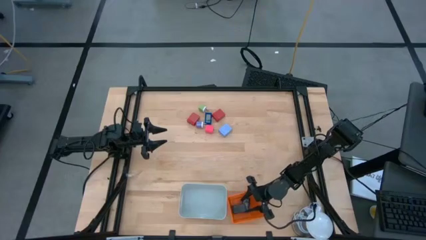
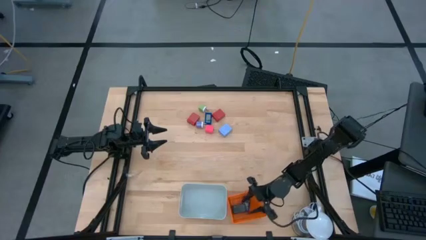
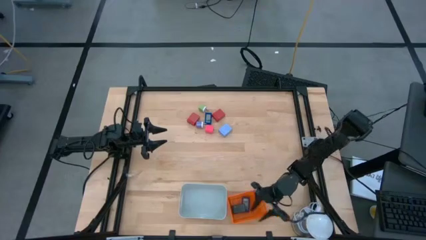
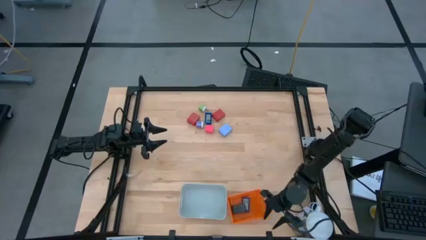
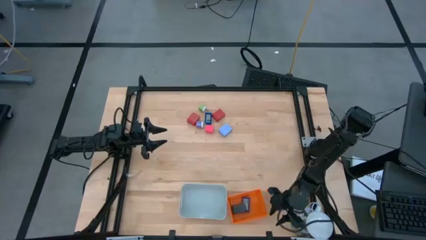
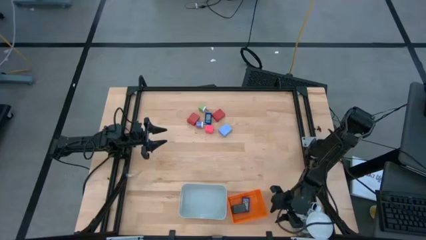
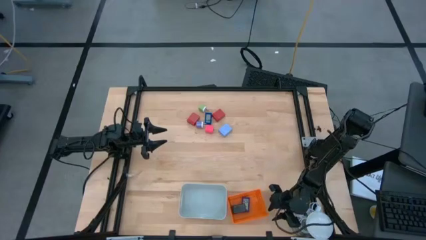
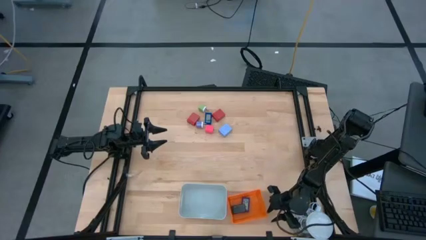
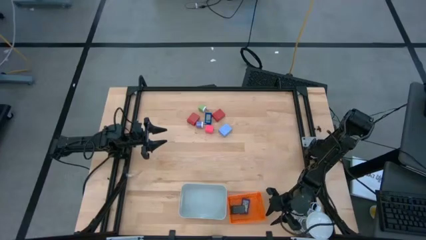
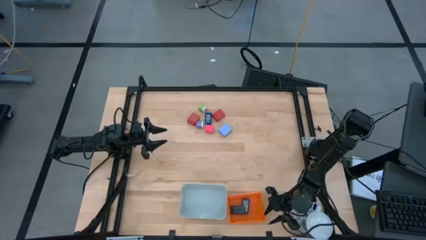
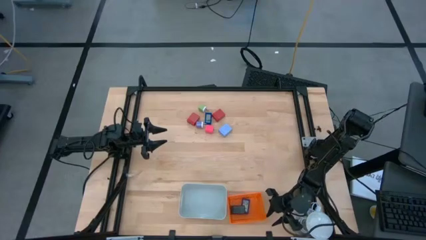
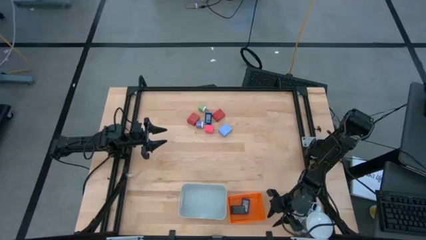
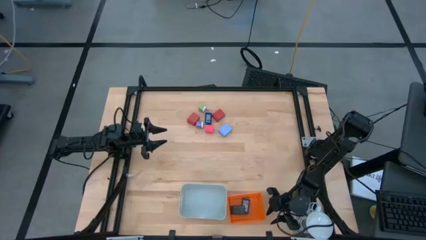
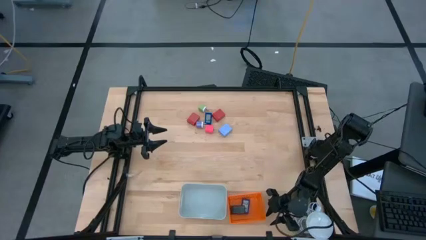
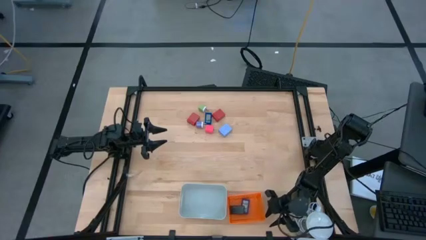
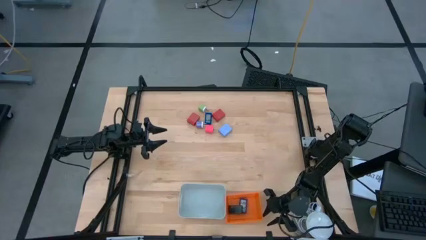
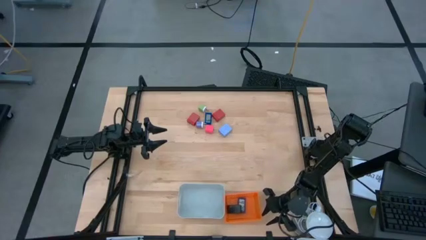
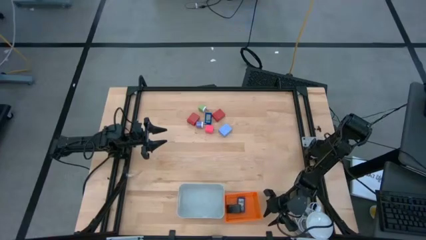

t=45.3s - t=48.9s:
Task: Pick & Place Office items
Adjust the orange bin

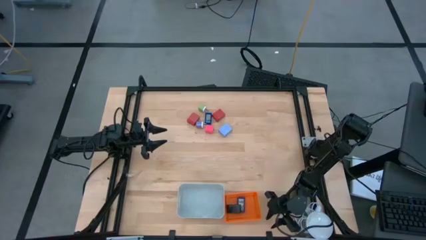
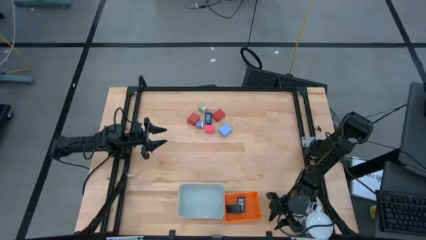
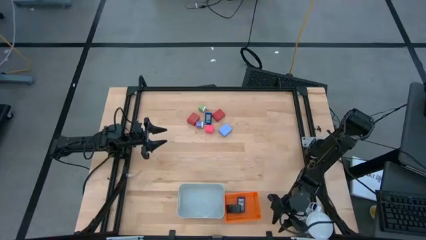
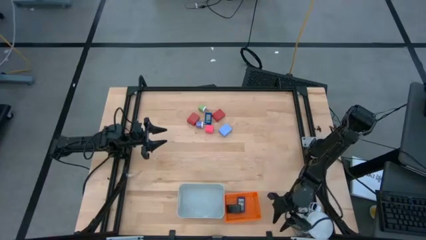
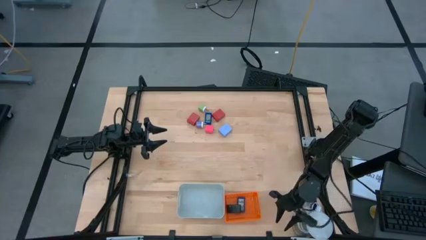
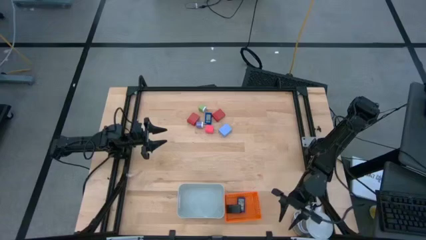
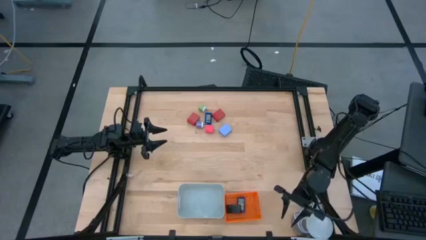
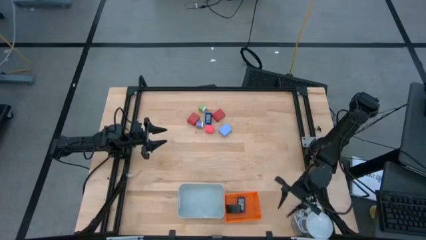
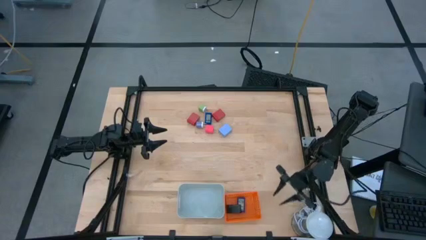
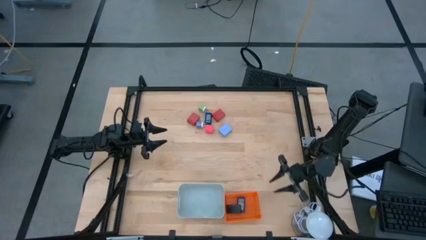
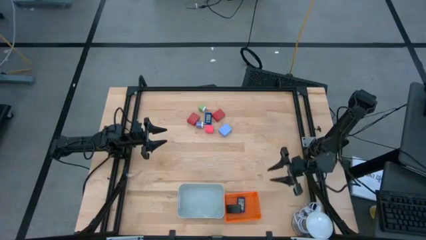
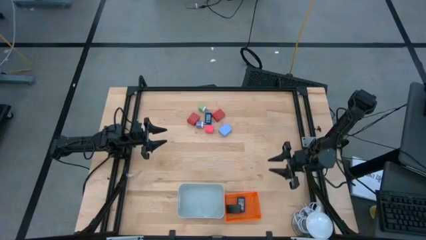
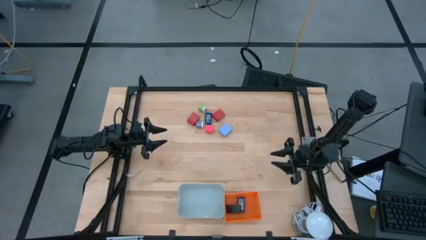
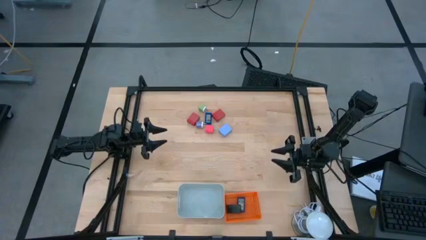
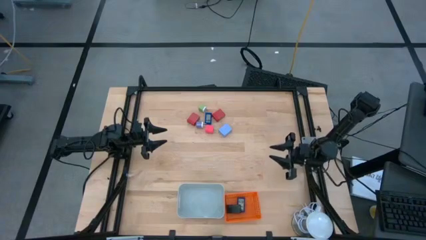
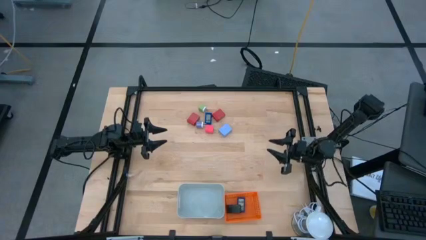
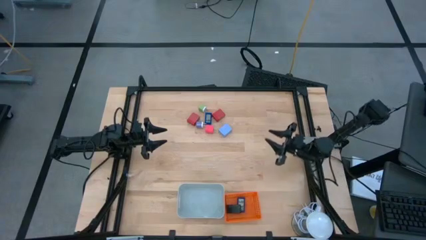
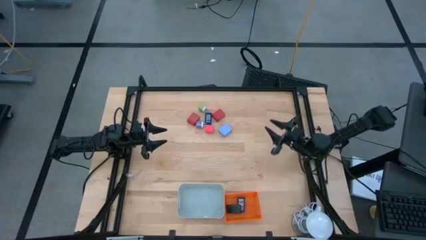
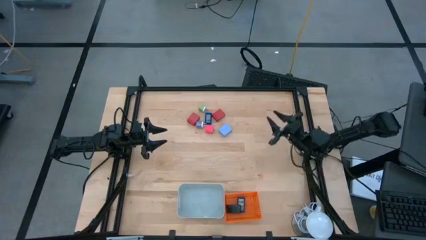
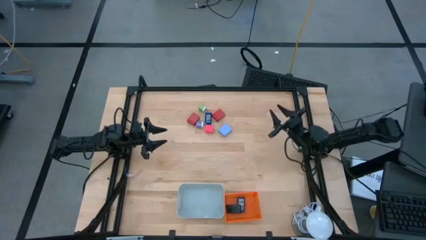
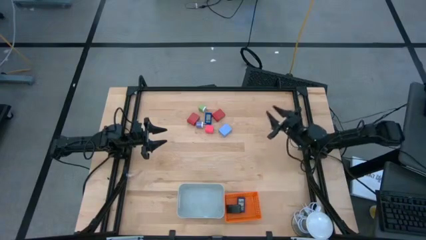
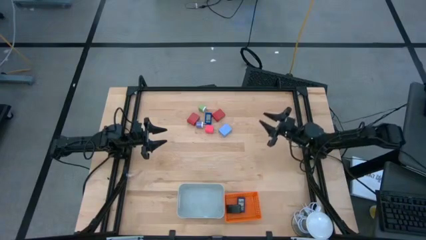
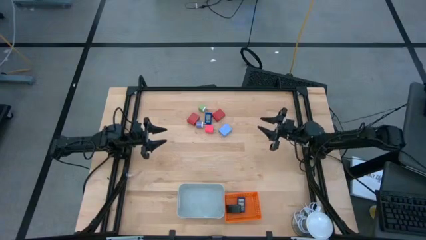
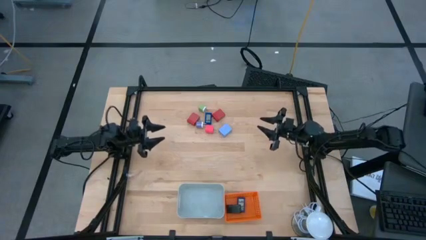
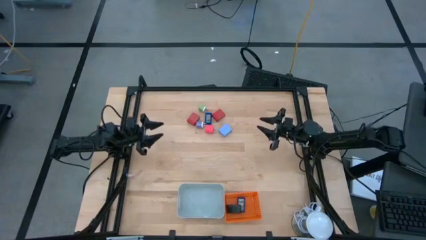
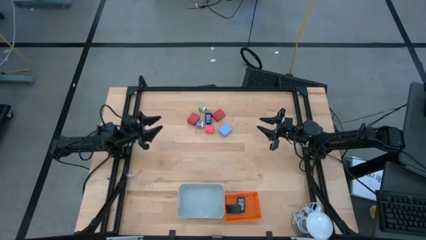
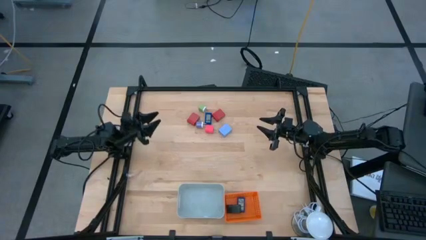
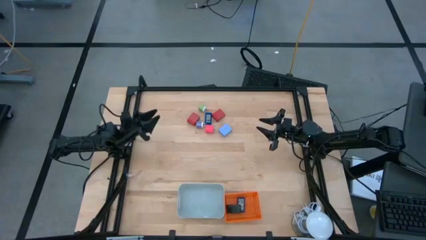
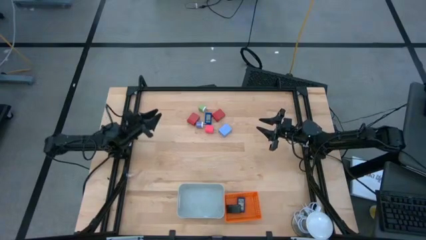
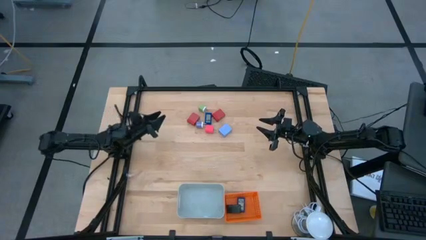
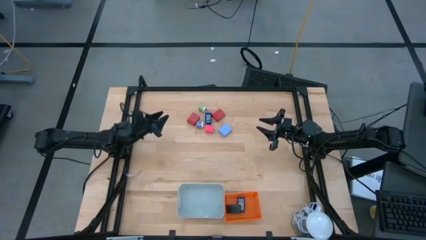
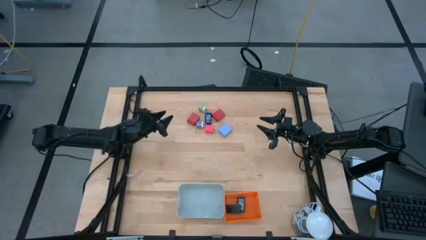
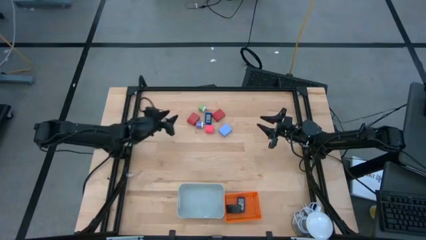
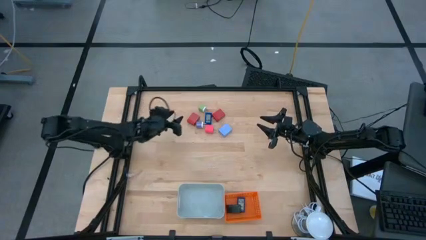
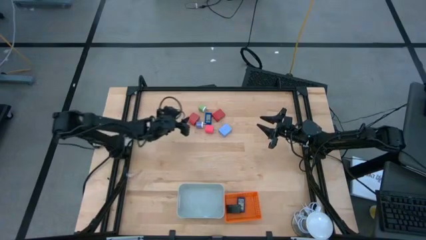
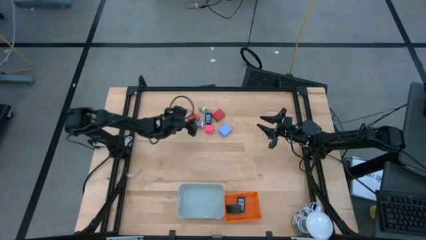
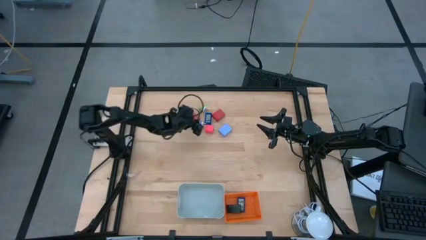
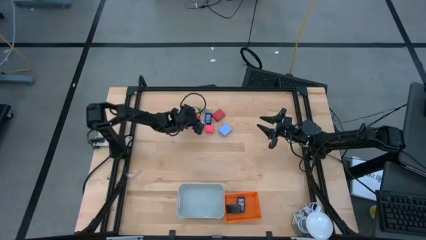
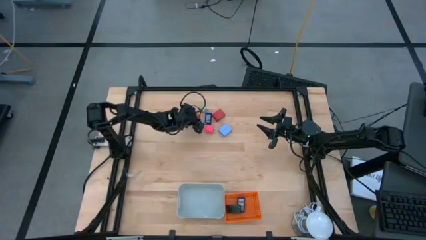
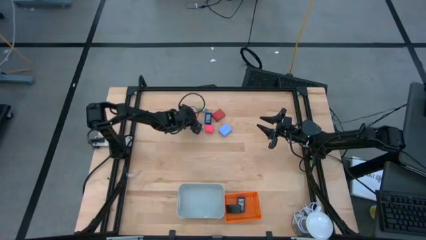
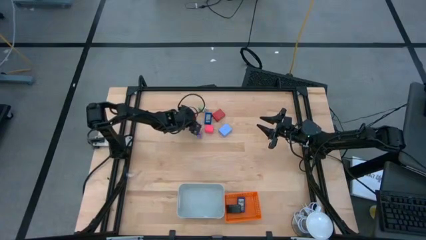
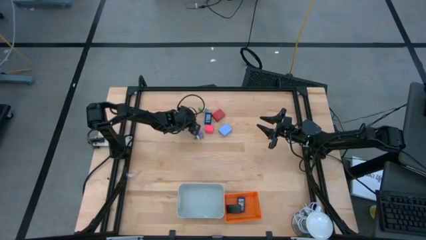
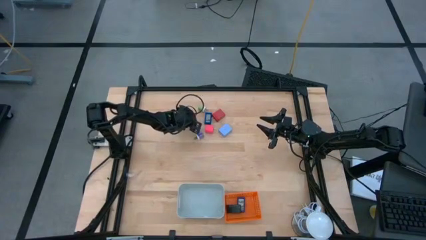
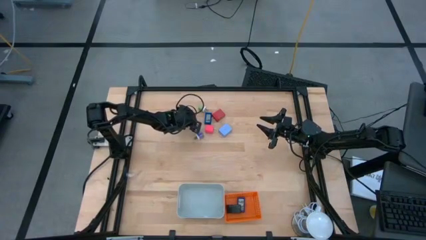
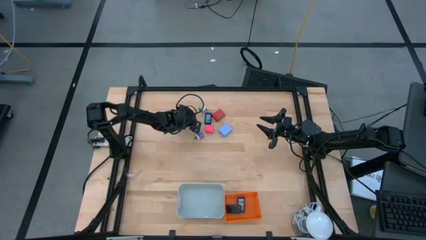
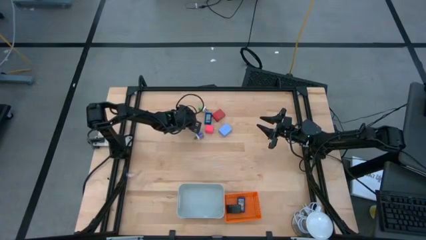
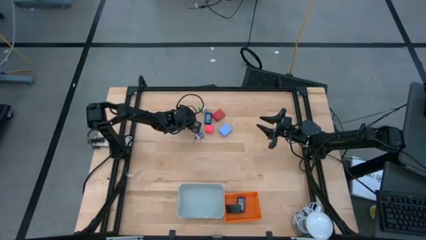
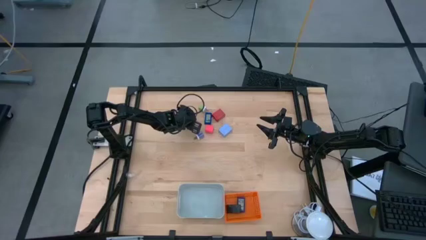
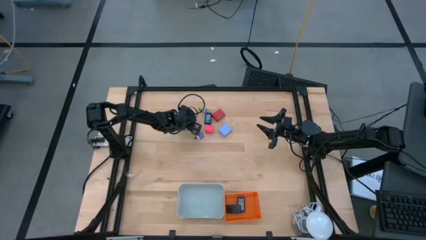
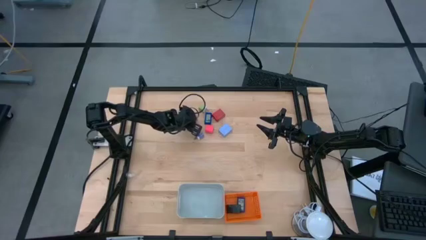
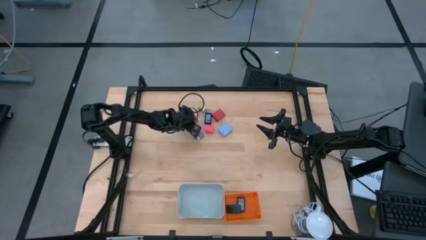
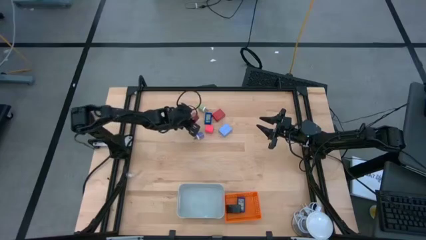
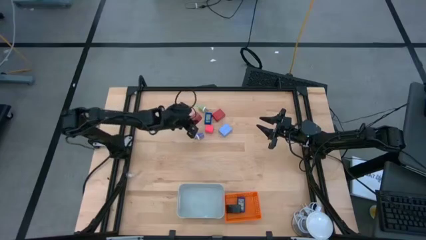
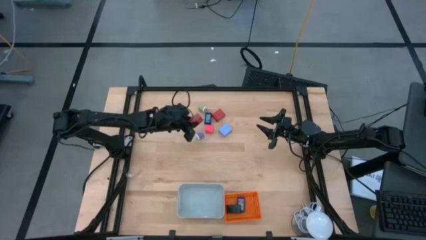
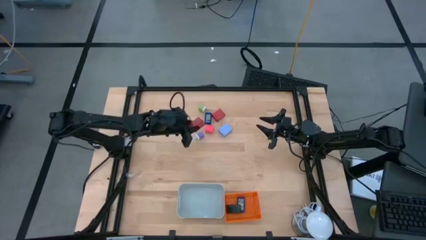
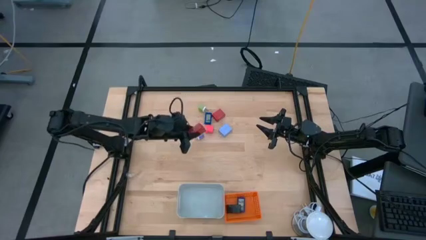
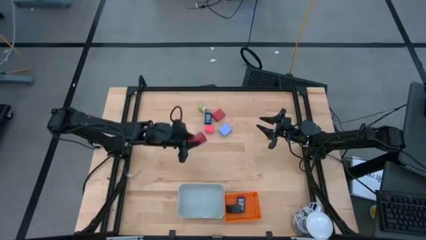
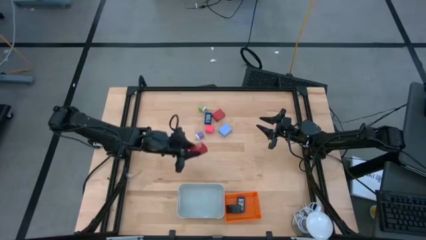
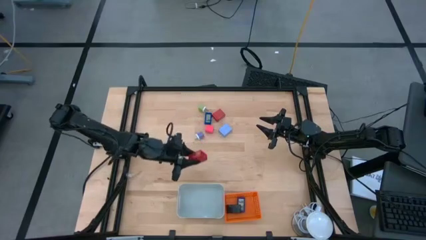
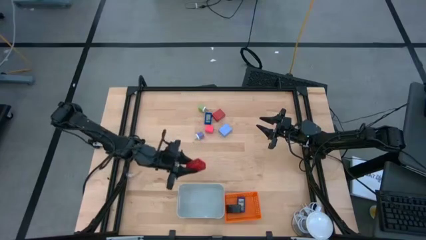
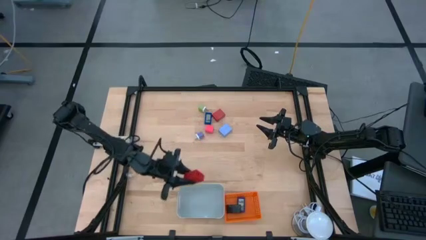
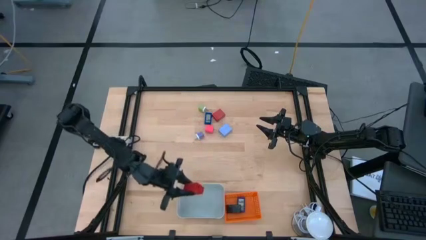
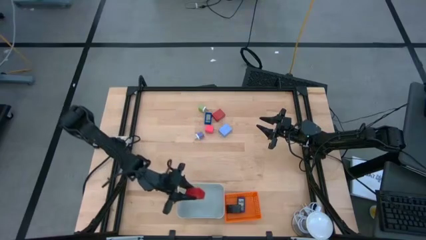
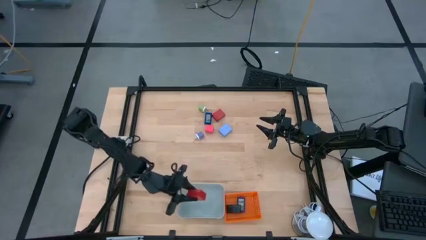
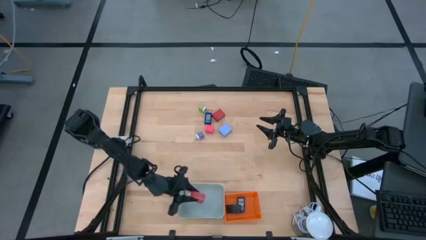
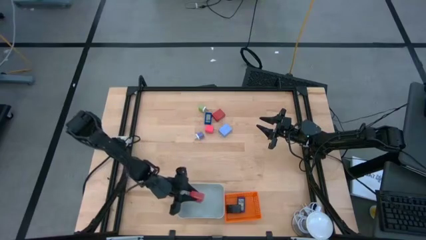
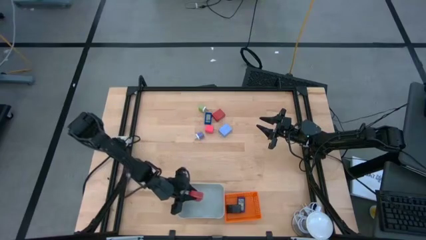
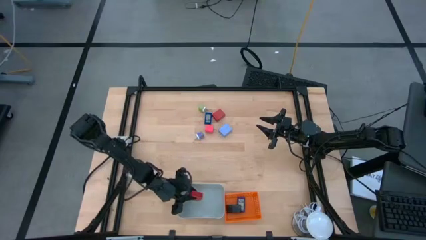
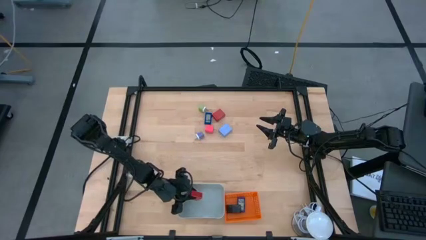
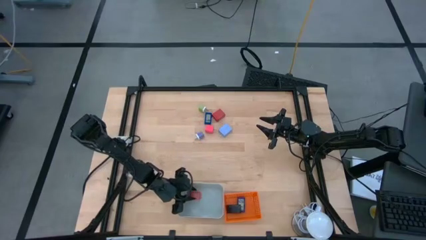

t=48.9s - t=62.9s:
Put the left red charger adapter into the gray bin
